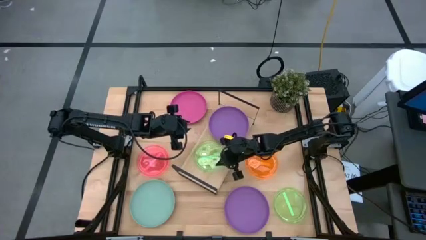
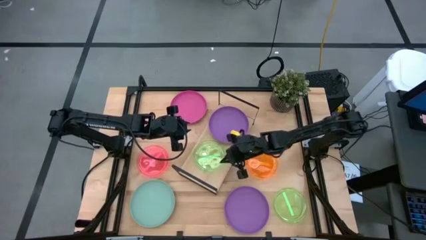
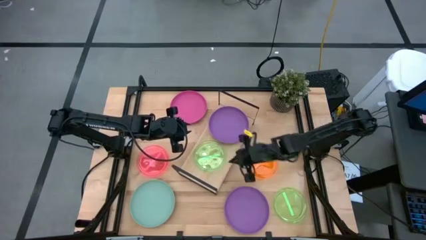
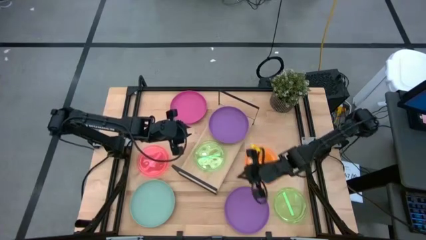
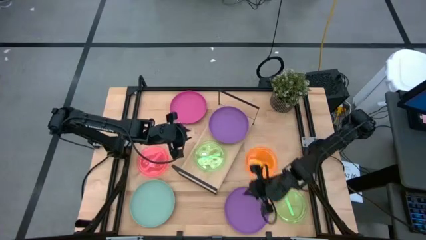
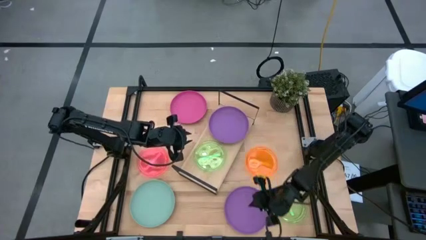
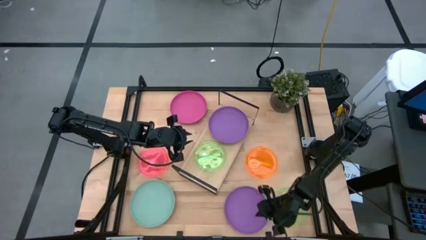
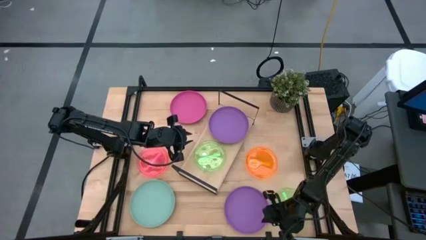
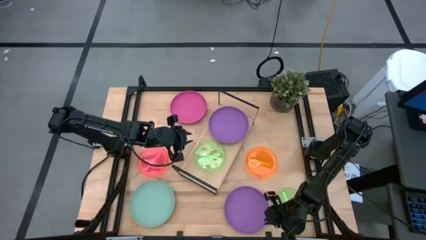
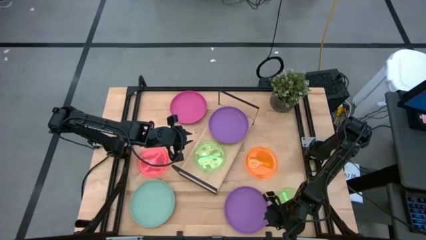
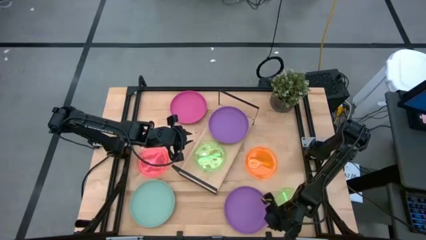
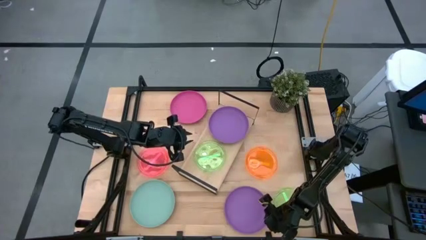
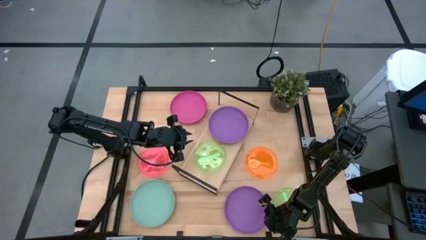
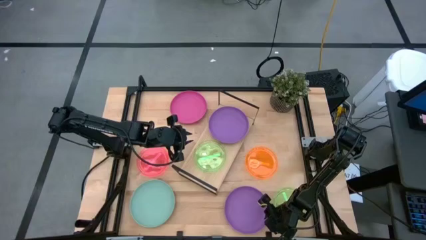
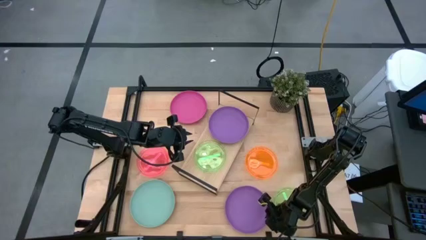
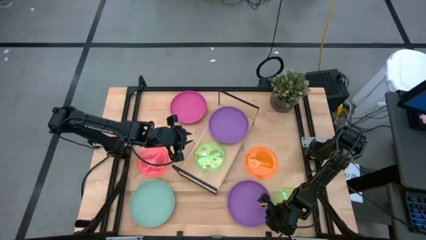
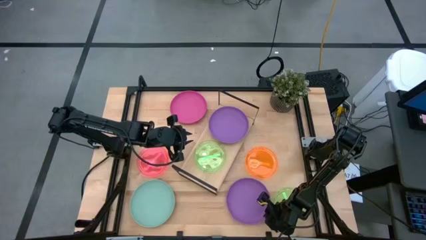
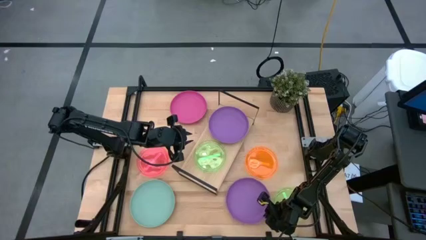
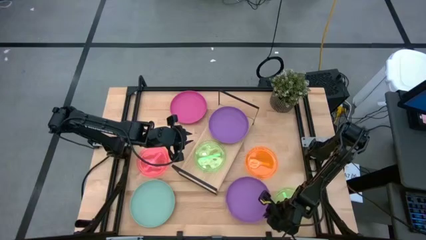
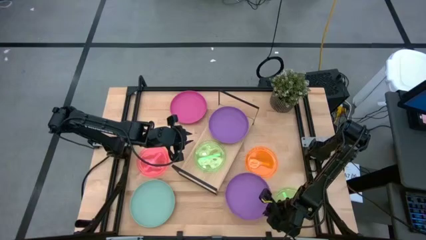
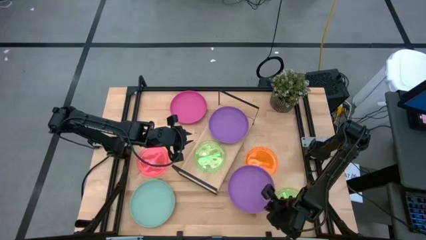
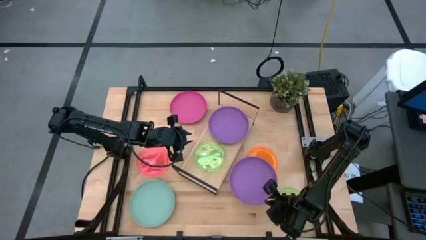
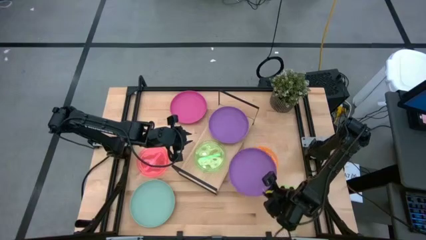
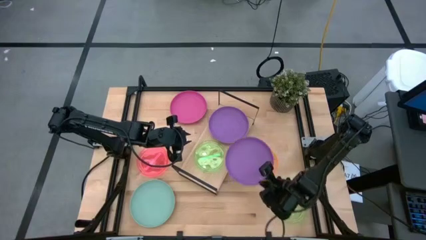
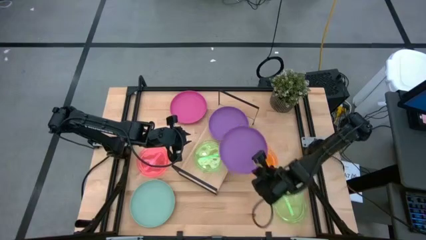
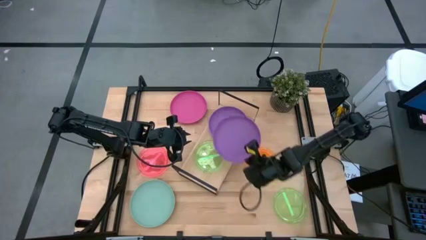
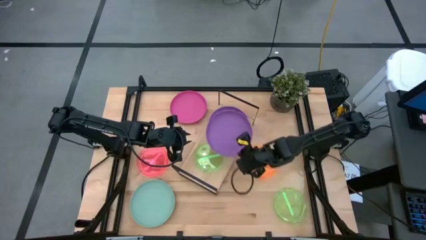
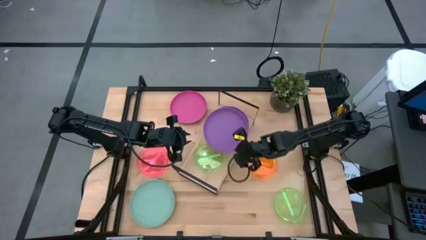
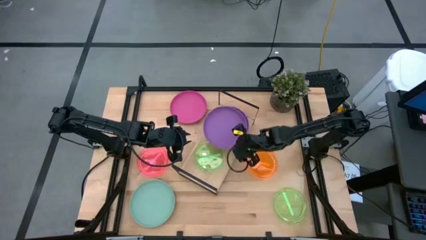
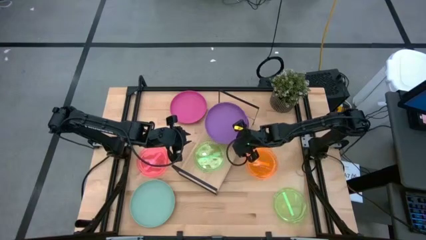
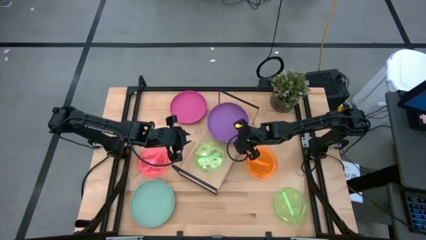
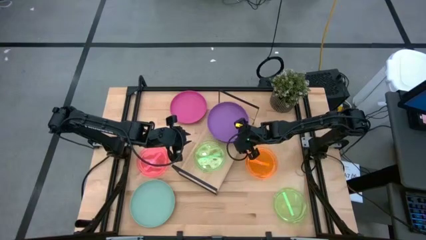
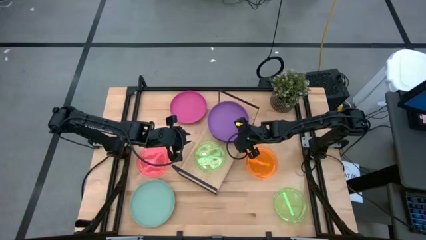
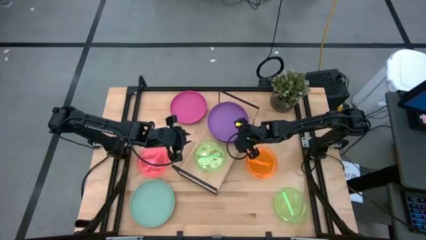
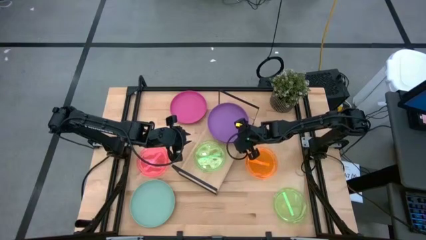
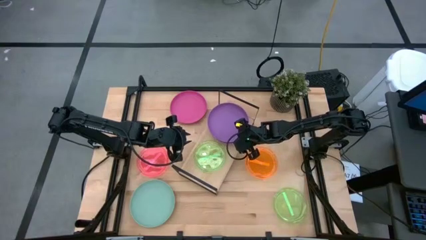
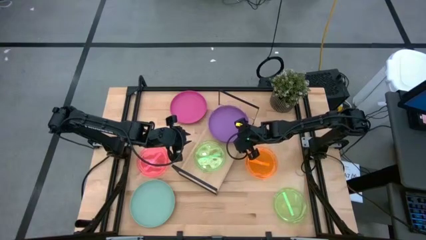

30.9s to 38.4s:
Task: Place and stack plates onto a shelf
Stack the violet plate on top of the other violet plate on the shelf

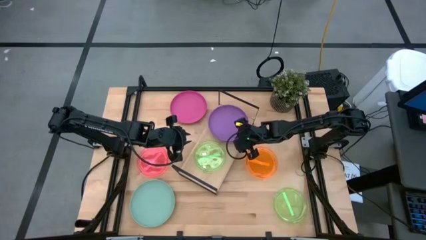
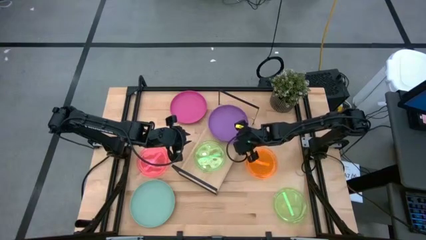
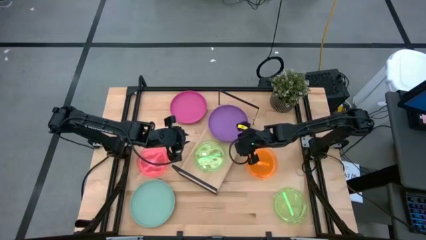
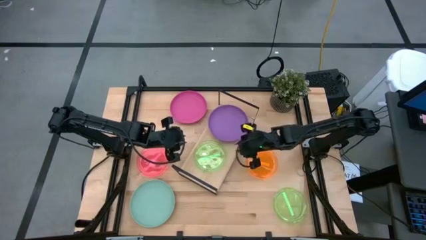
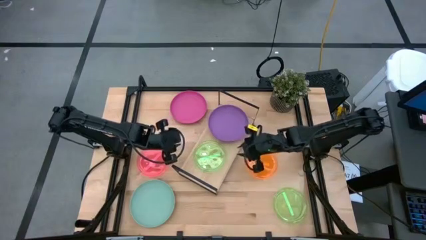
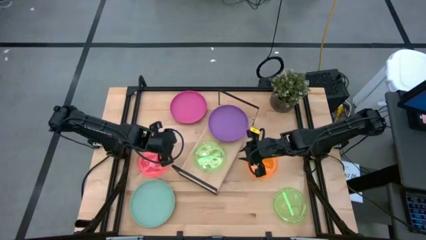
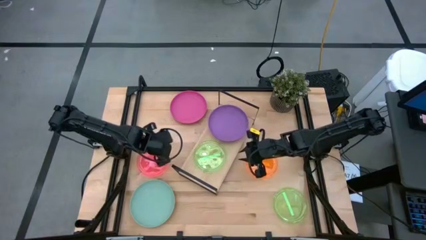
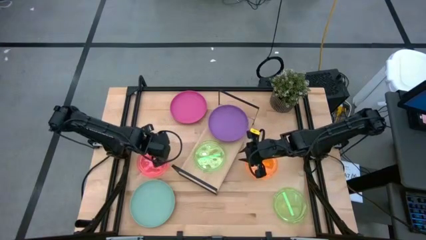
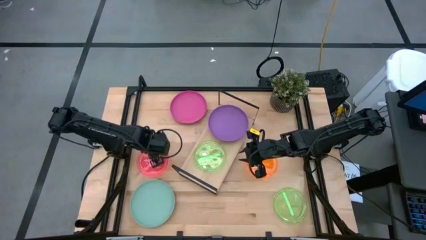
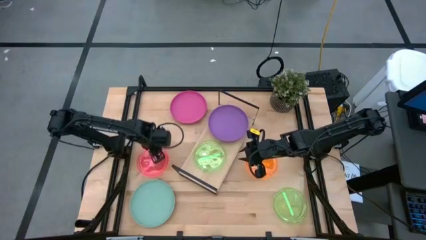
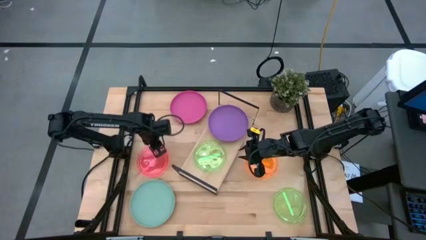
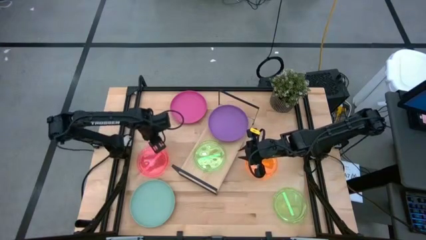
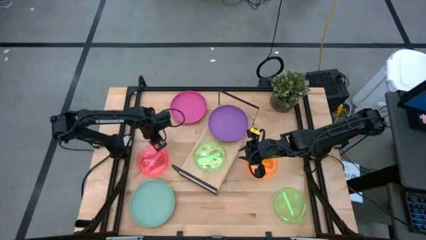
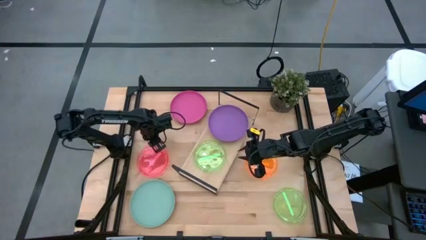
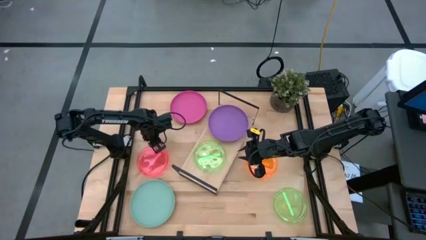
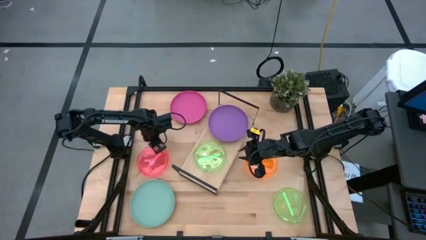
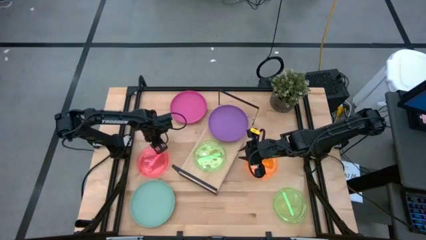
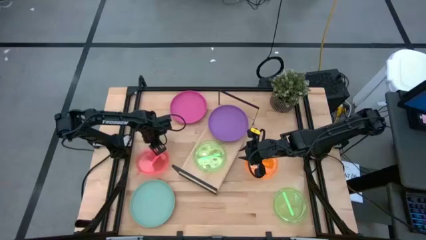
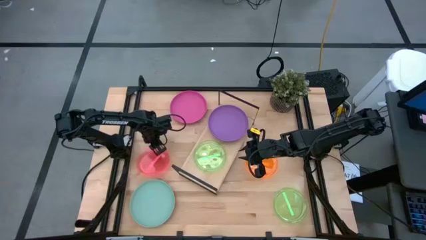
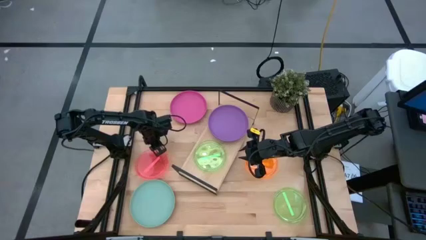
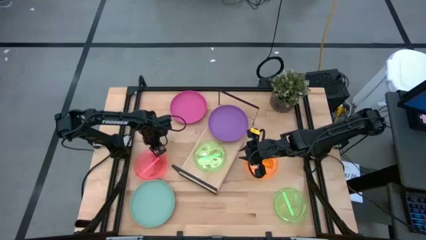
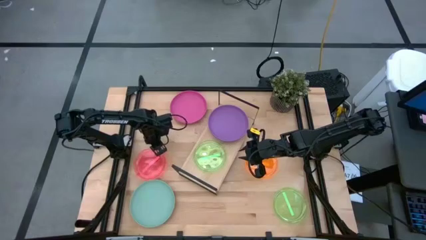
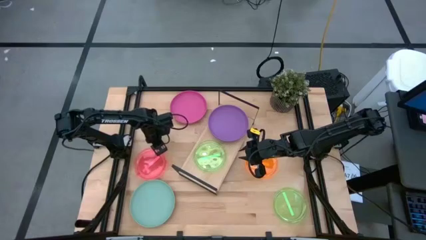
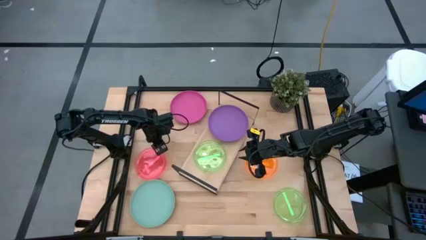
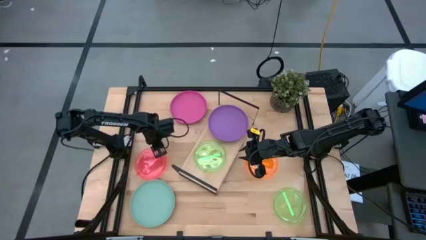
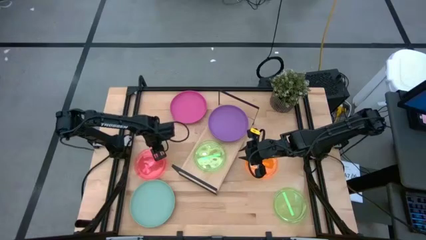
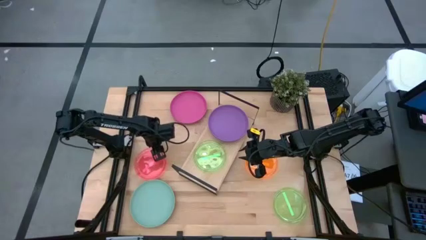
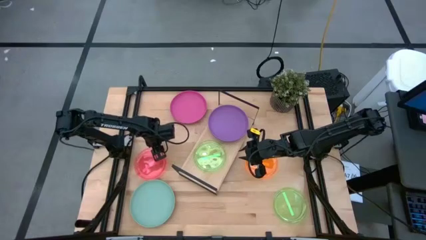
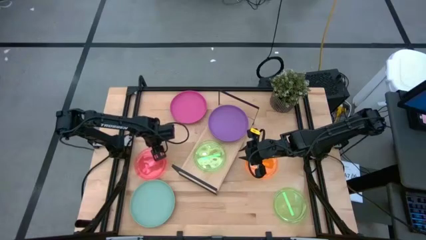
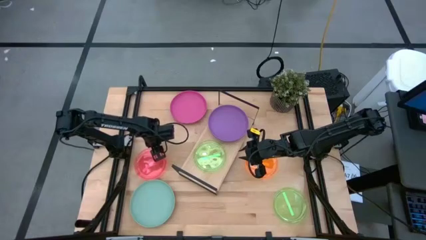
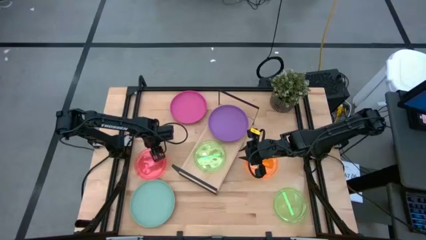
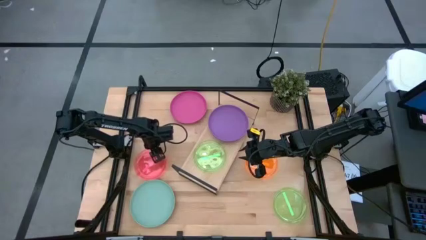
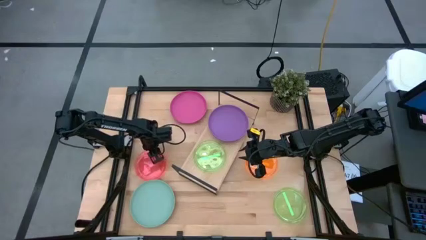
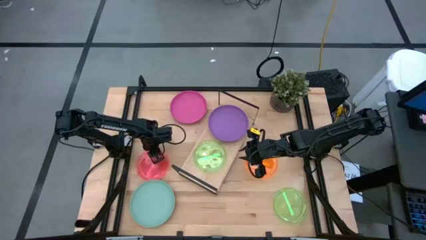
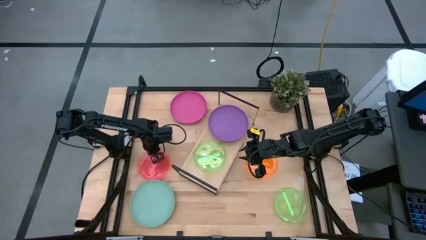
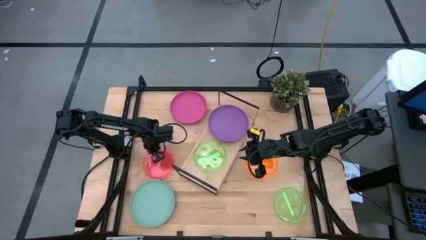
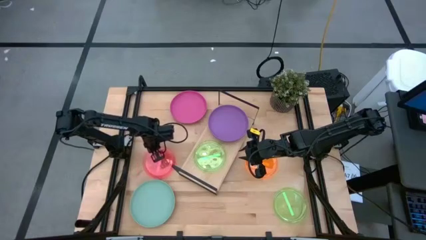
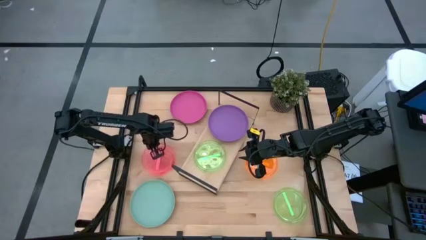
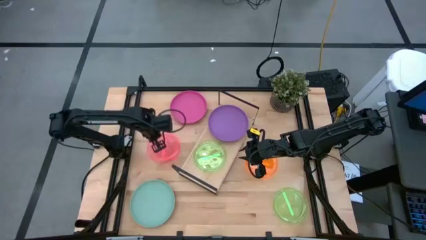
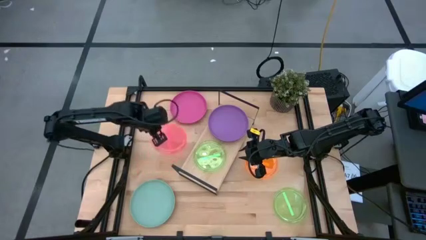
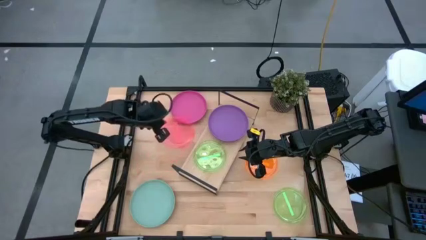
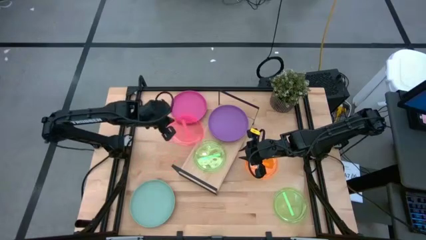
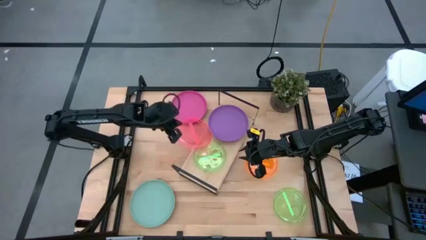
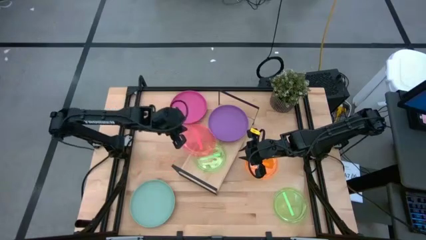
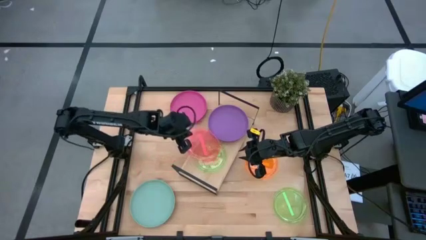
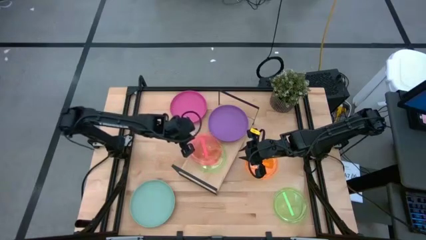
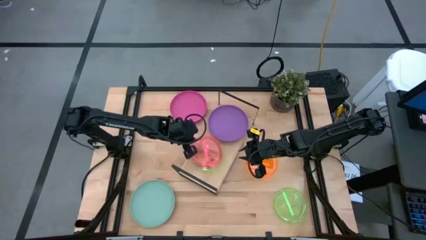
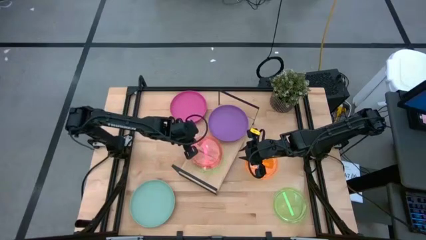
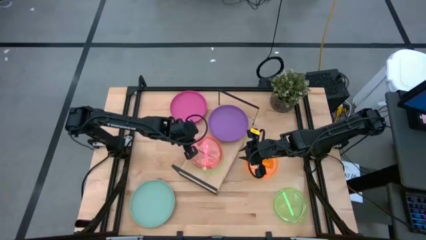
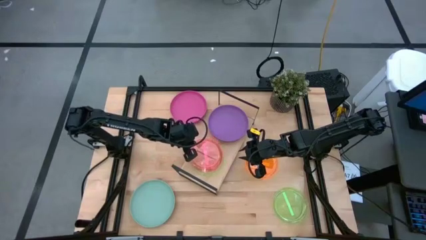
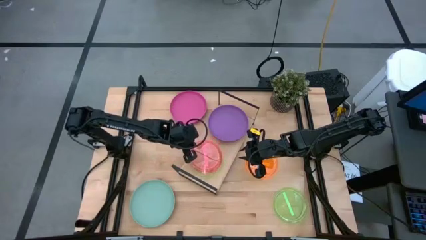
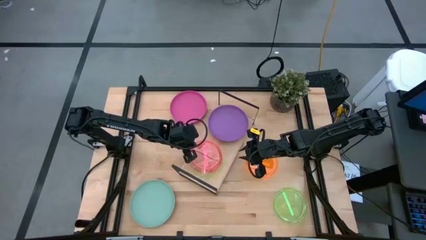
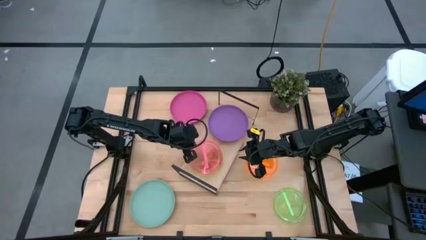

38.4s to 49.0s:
Stack the red plate on top of the green plate on the shelf
